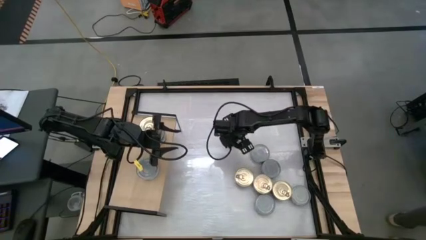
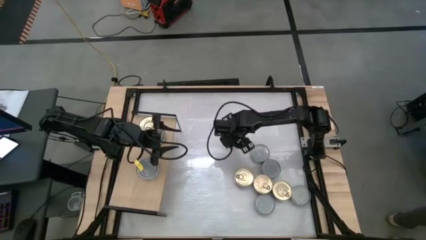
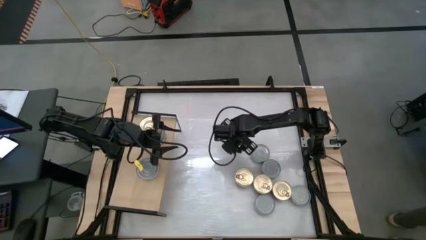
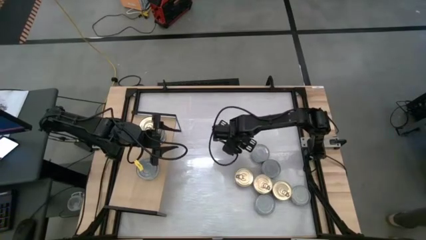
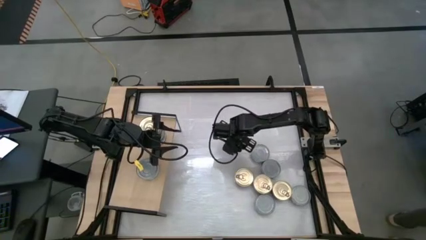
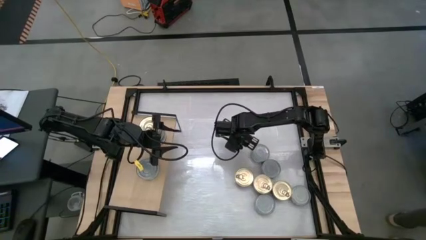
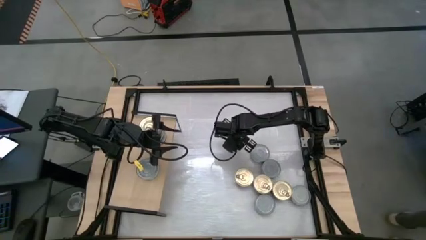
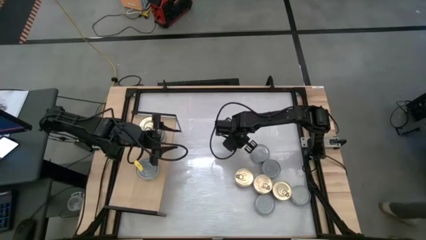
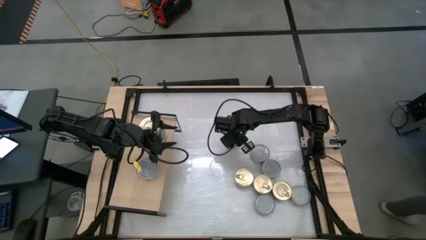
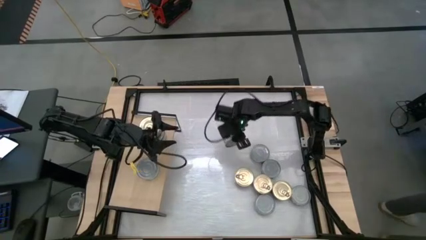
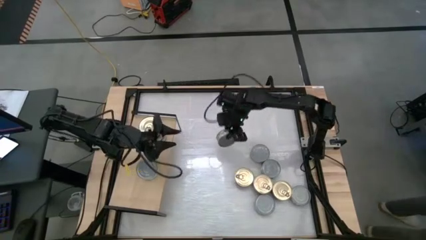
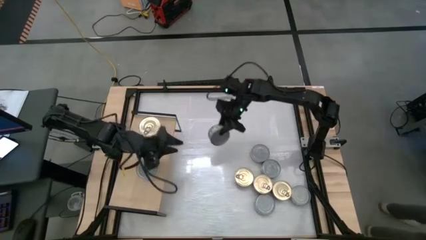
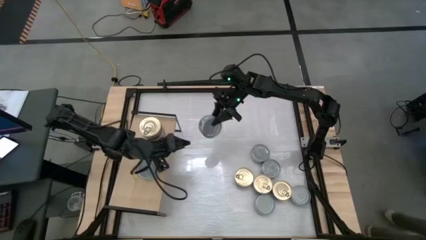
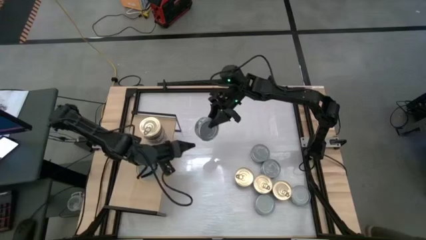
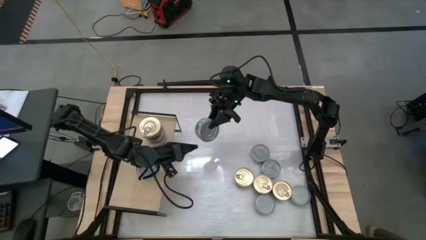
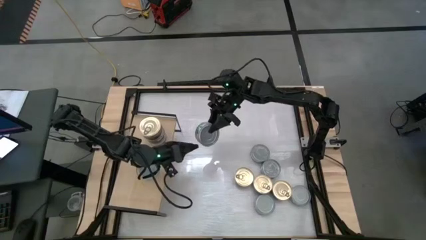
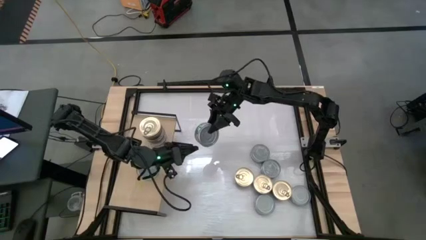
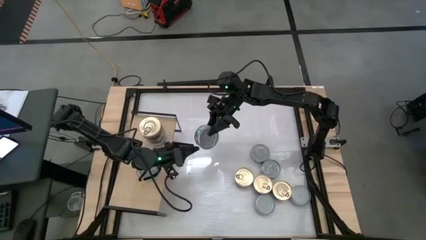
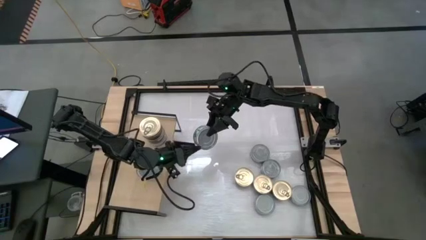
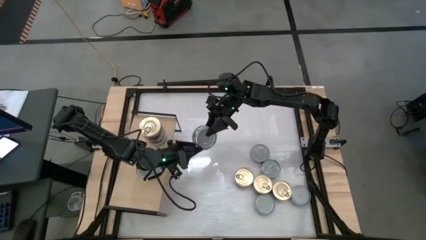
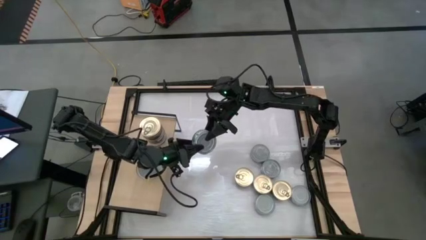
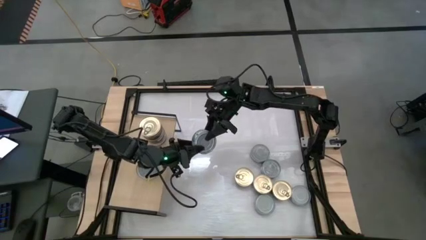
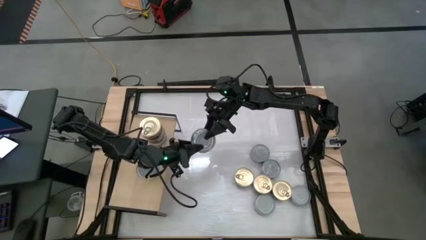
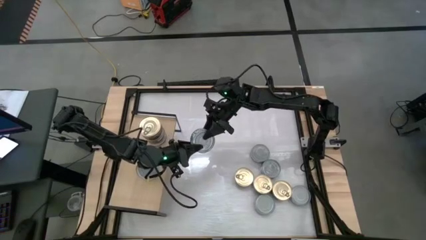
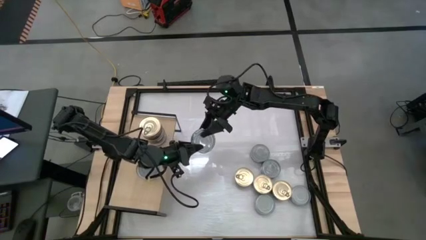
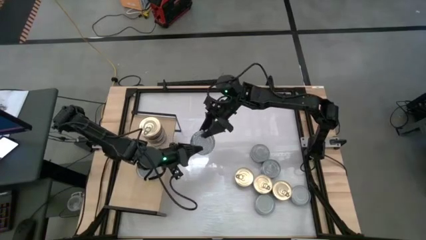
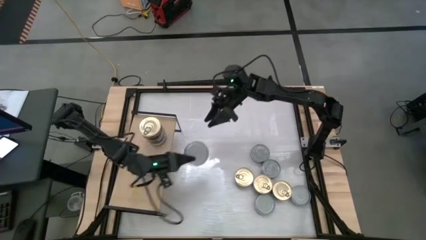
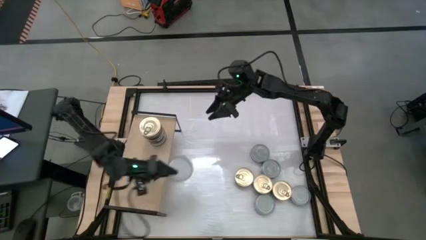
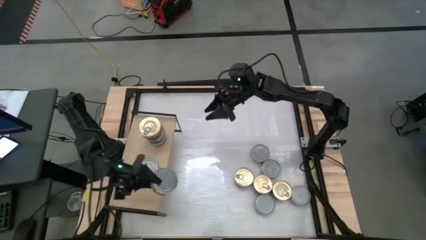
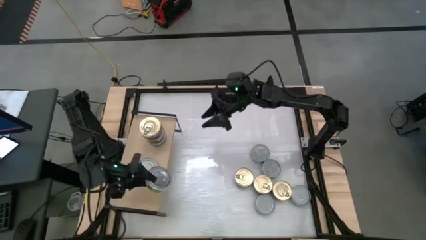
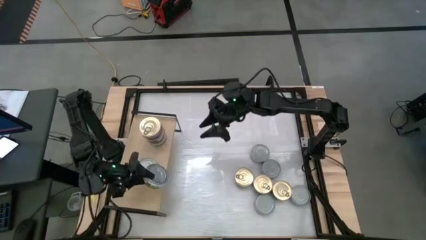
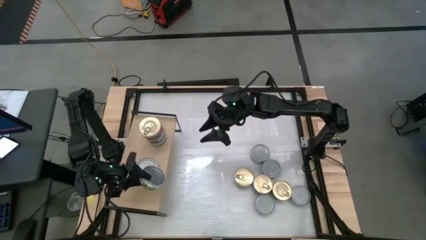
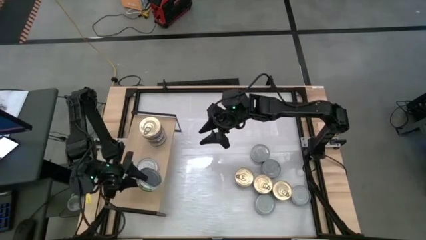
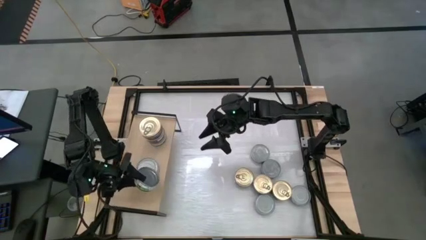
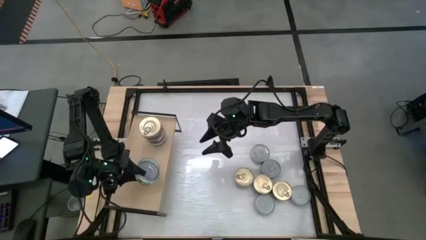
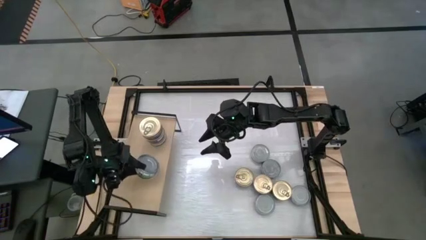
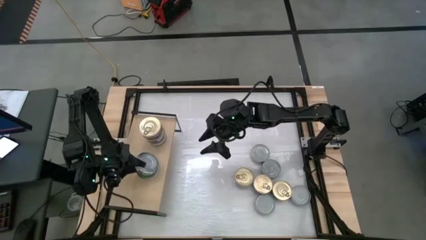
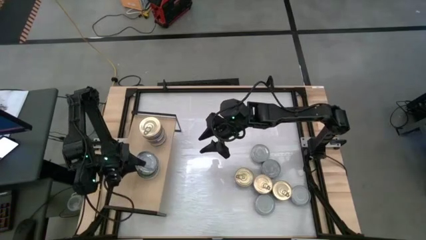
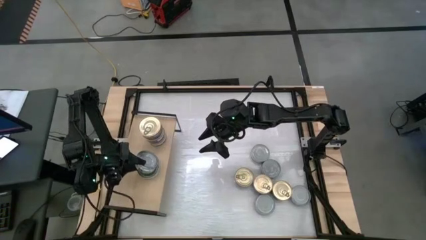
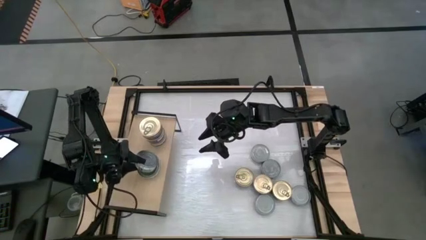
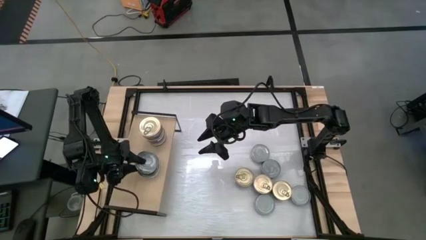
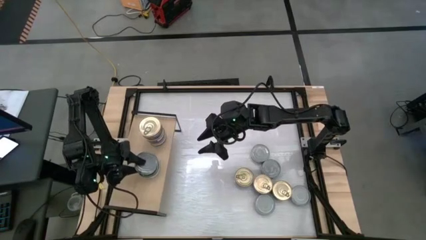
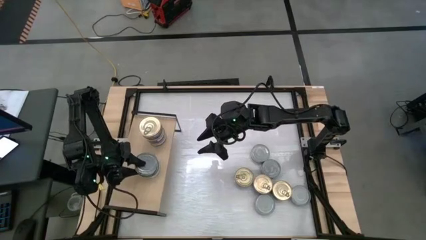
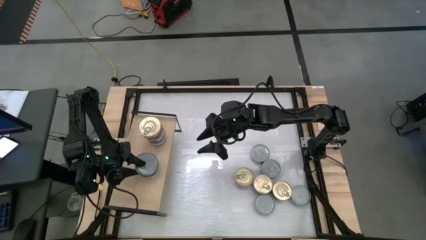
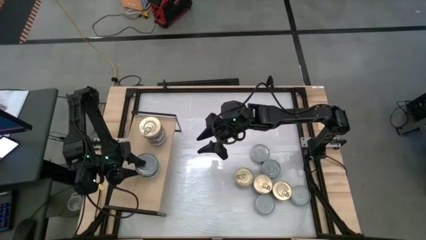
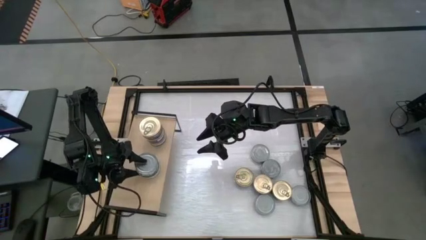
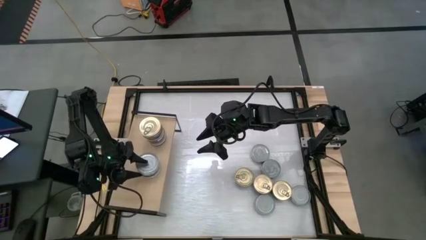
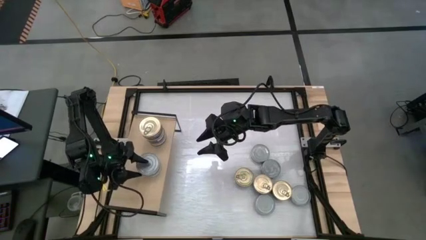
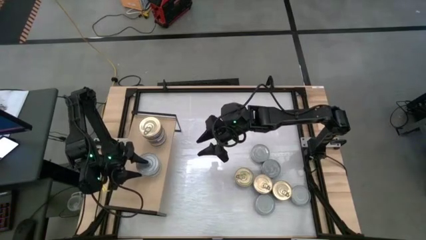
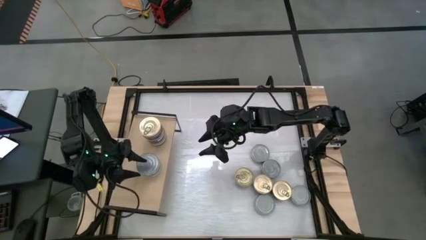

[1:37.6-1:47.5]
Task: Stack canned seafood by type on shelf
Stack the green tuna can on top of the green tuna can on the shelf

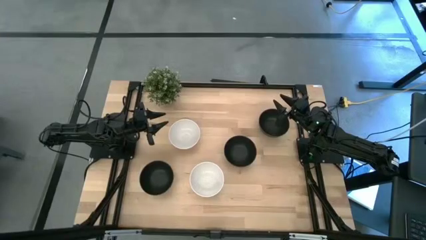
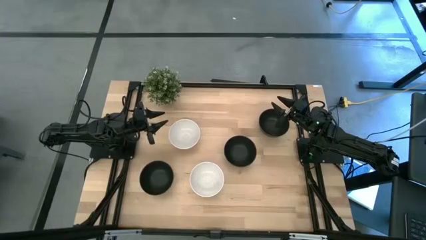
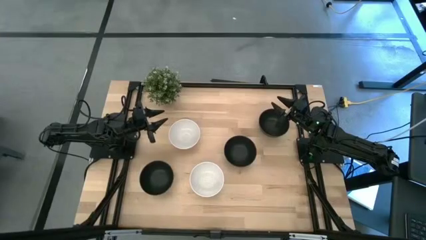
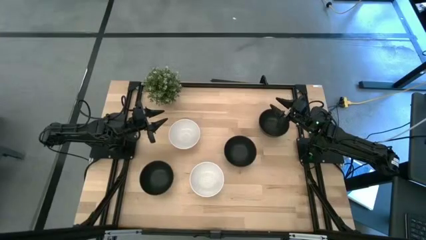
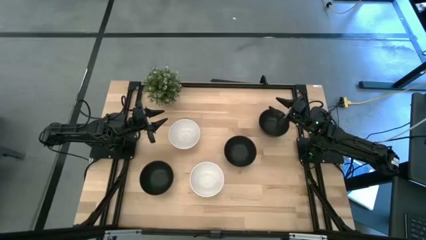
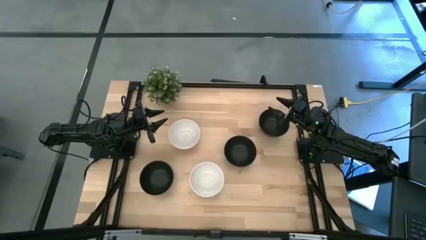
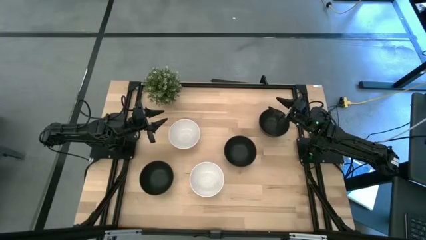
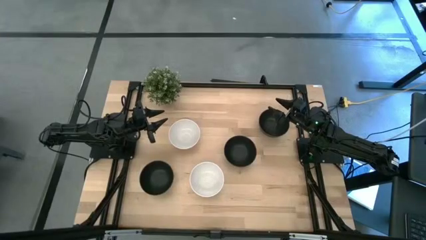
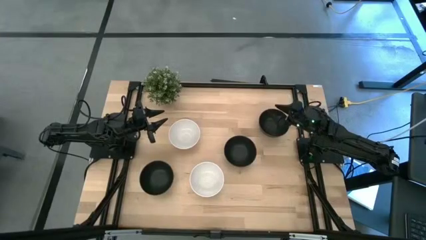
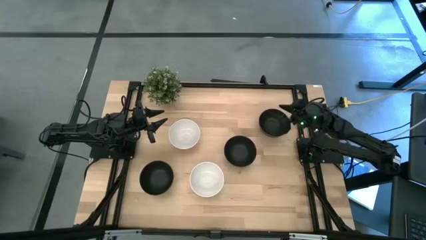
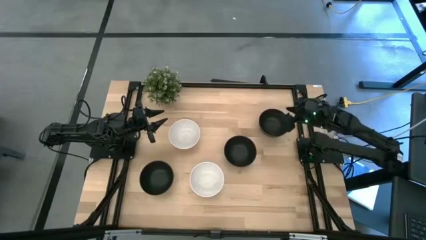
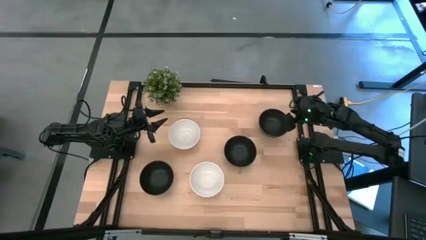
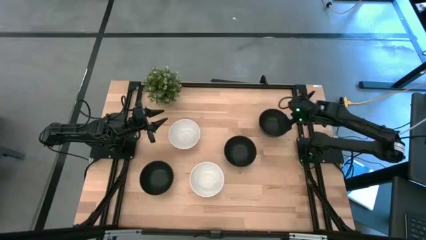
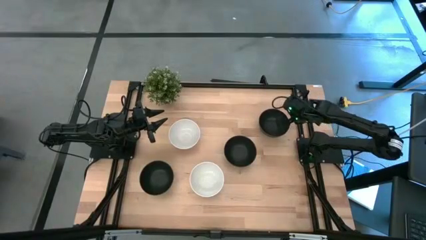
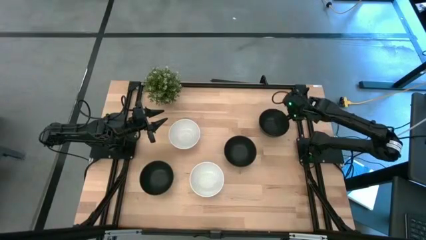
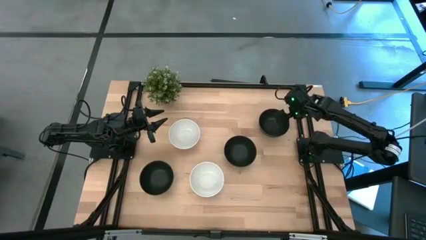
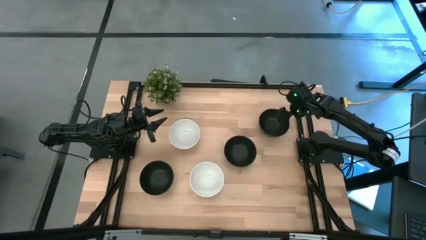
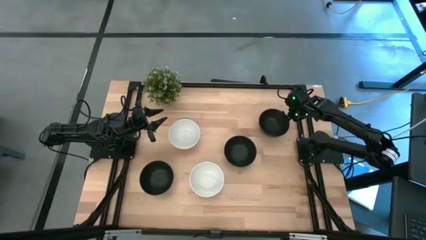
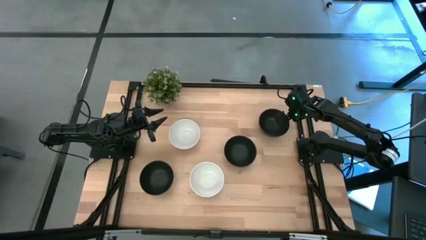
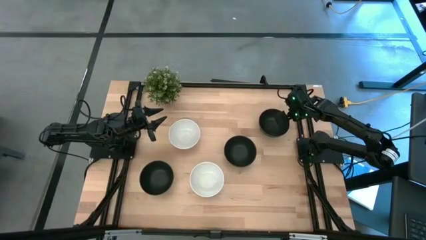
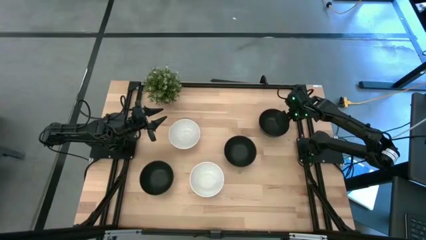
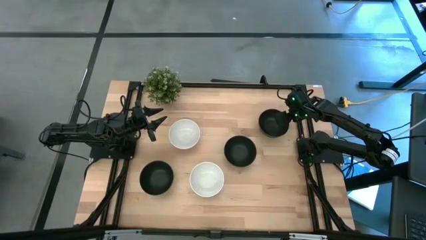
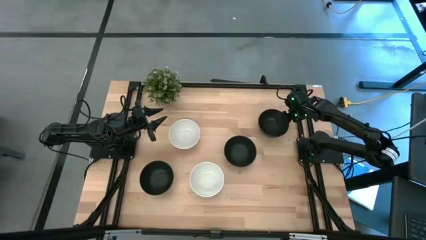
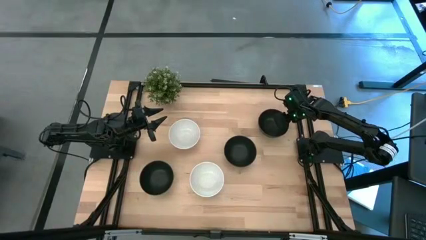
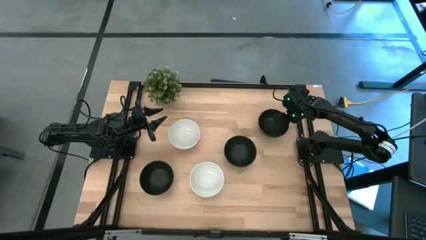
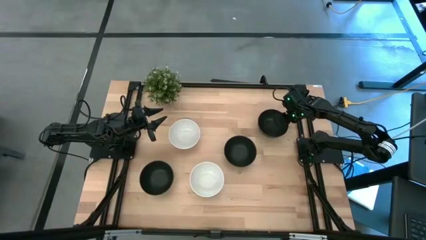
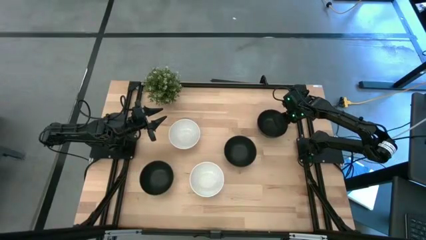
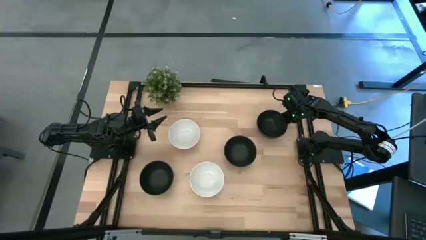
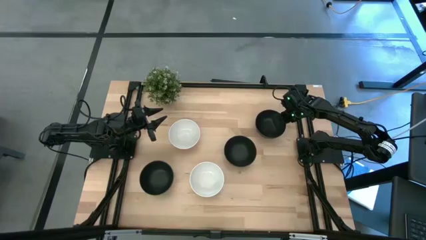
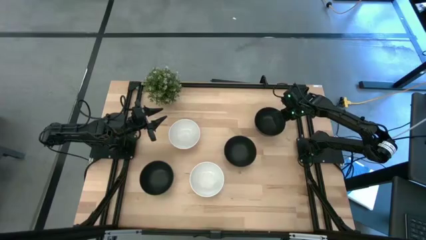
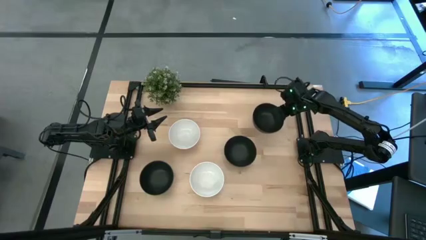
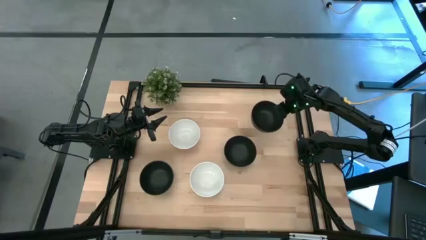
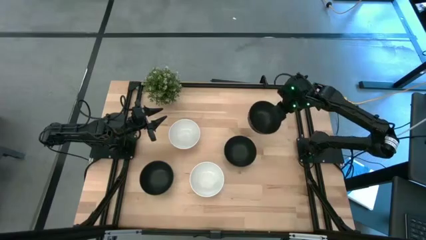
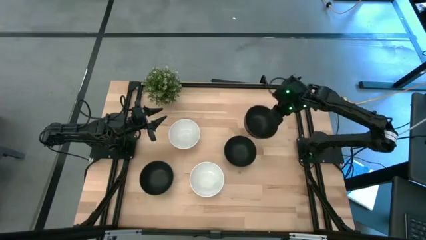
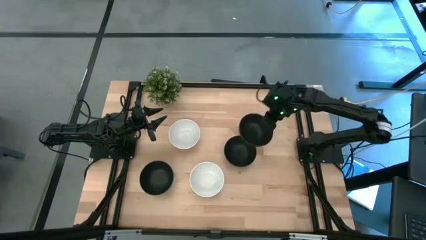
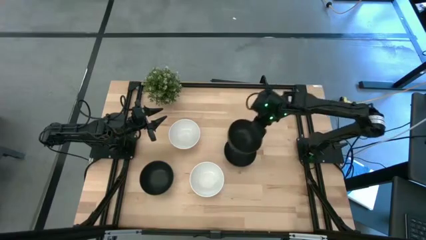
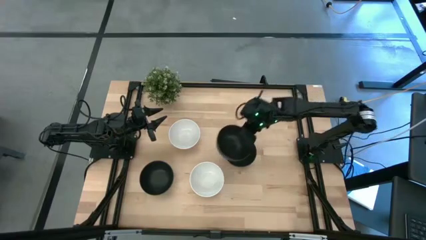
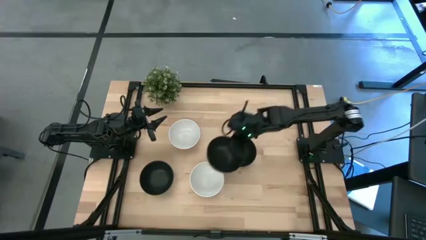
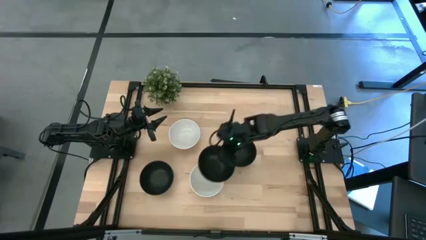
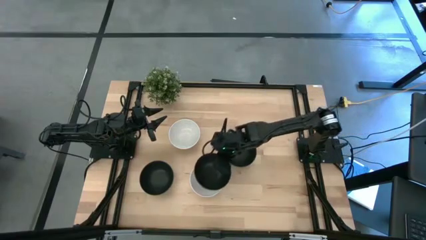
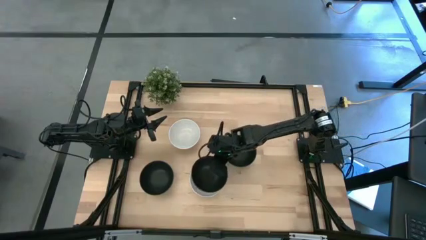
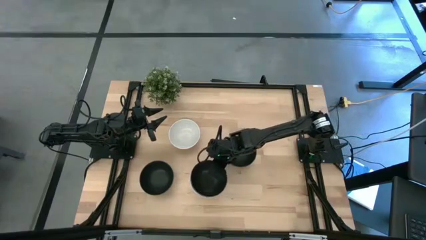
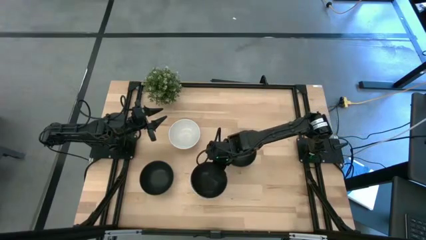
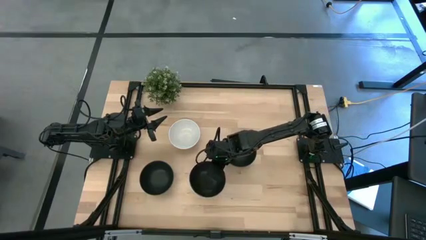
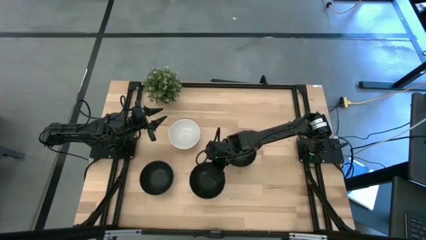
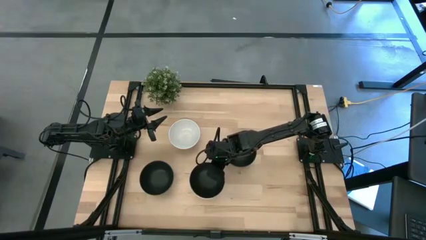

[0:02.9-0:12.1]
Task: Nest bowls inside each other
Stack the top black bowl on the bottom white bowl
